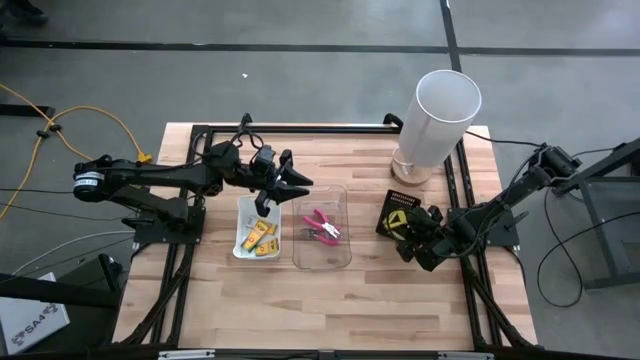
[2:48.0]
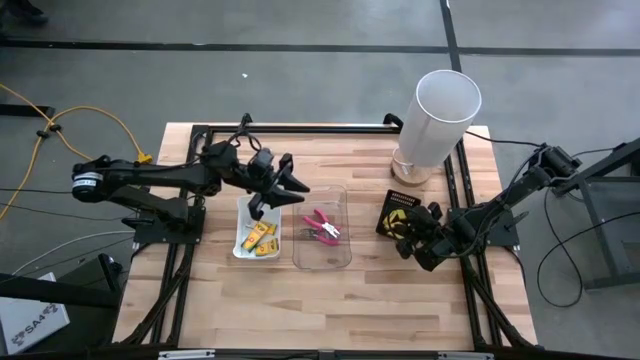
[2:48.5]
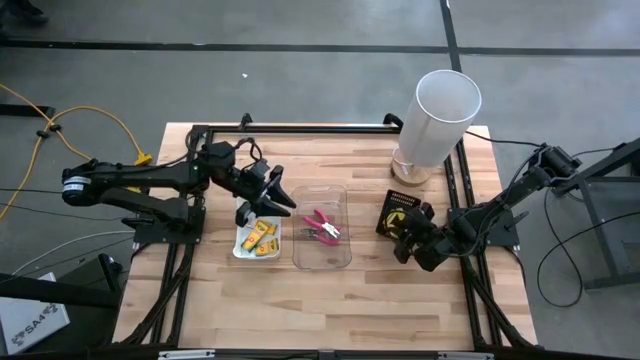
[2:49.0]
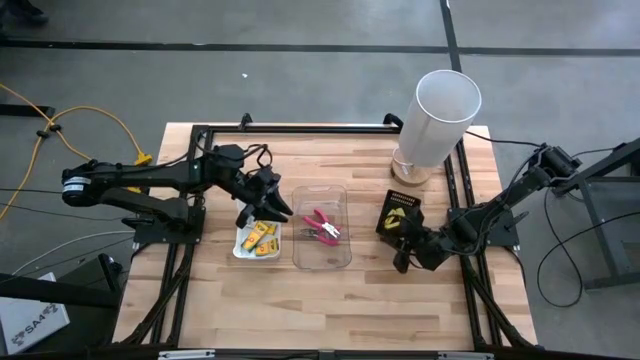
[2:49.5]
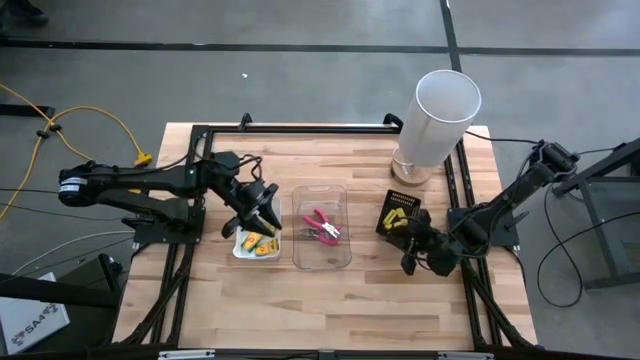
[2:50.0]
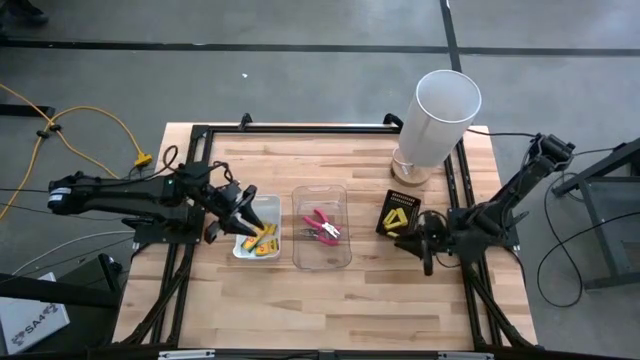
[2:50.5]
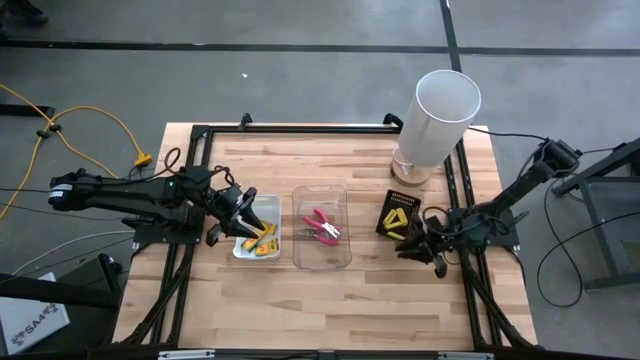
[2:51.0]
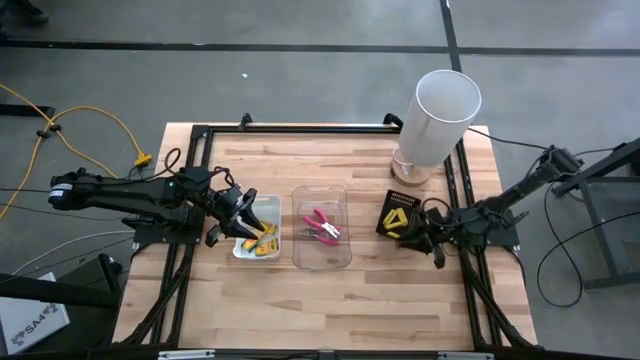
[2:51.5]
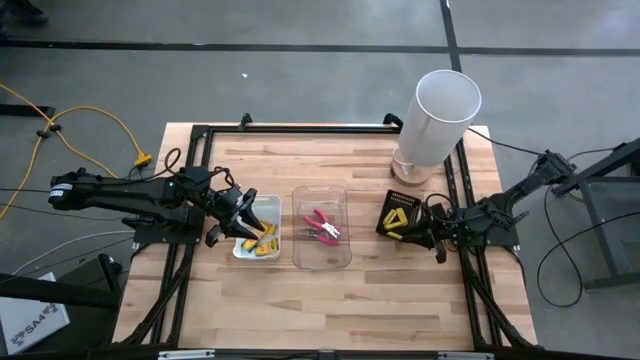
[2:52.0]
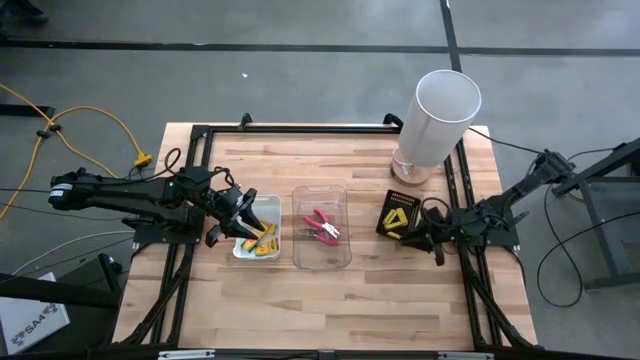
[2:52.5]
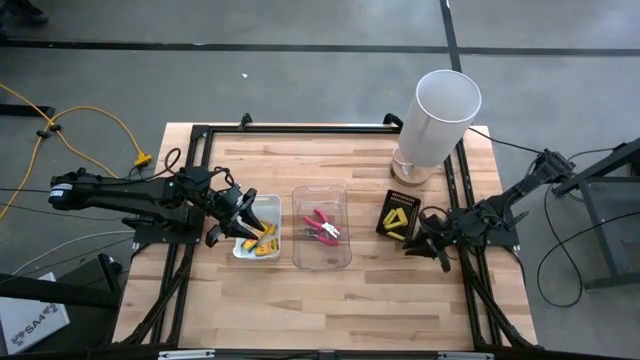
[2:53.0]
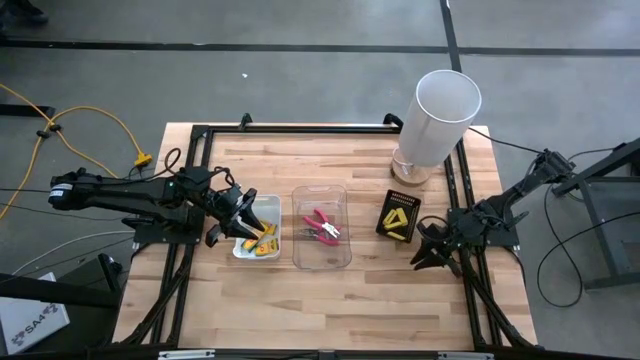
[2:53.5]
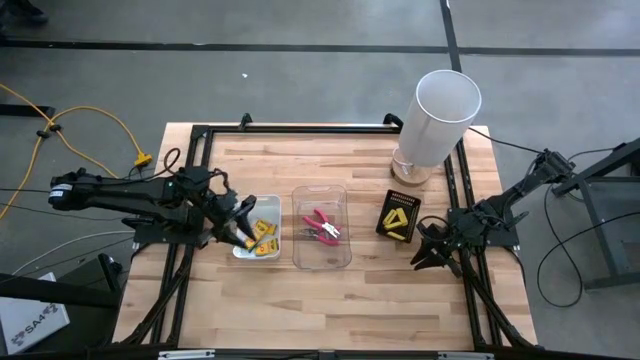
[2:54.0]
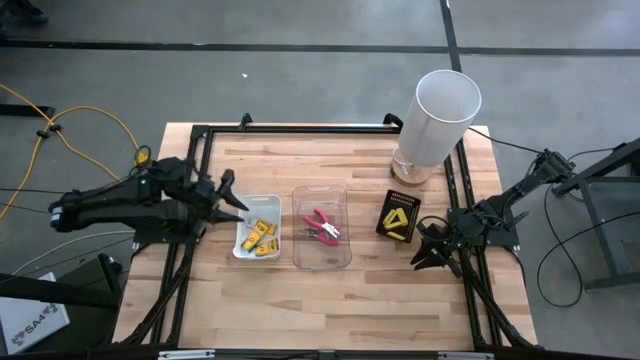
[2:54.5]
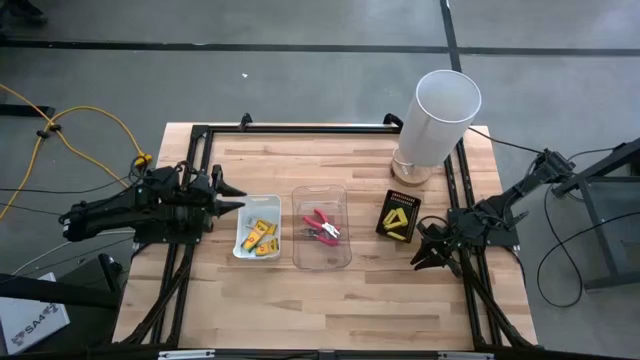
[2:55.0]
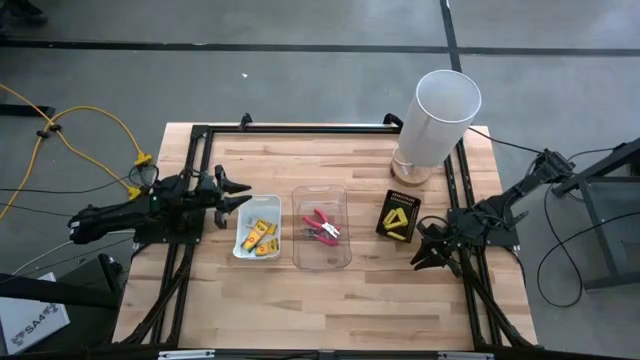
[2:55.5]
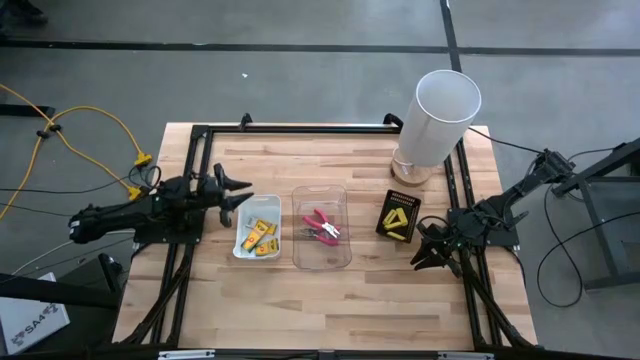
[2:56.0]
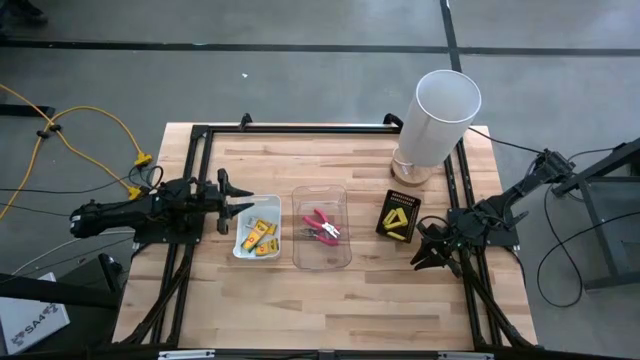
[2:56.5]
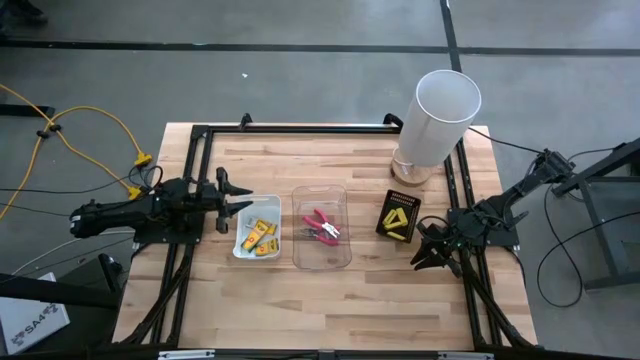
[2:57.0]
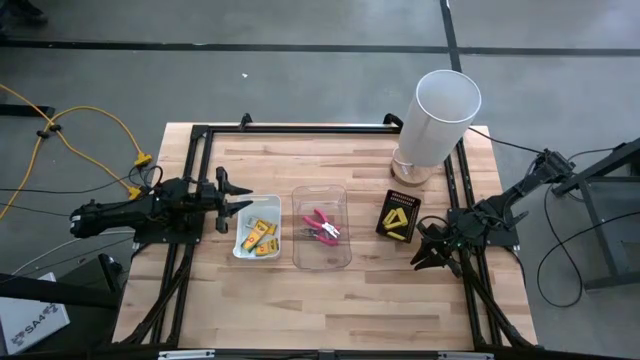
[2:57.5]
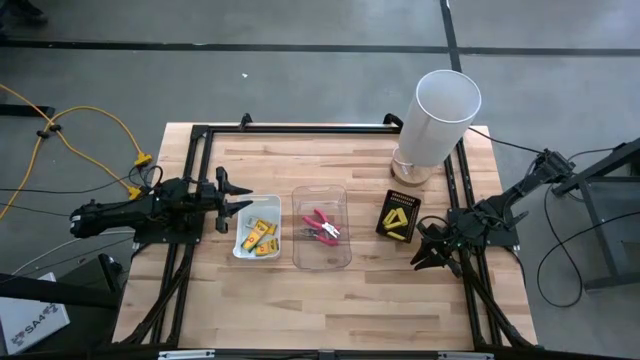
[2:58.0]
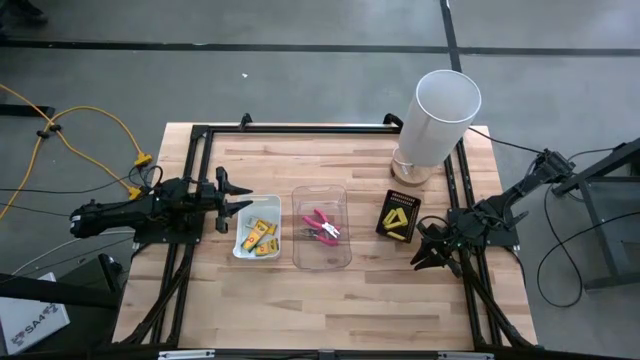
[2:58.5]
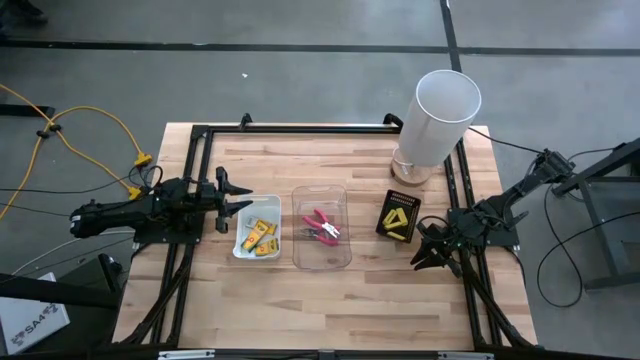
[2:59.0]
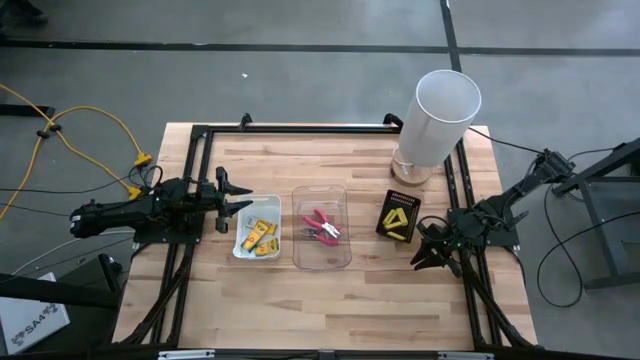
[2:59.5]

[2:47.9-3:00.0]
Task: Pick & Place School Supplies
Return to Home Position

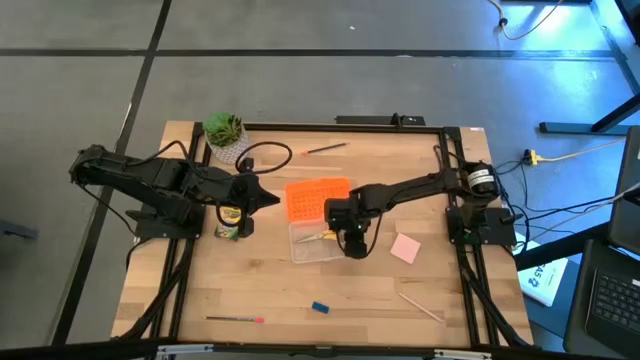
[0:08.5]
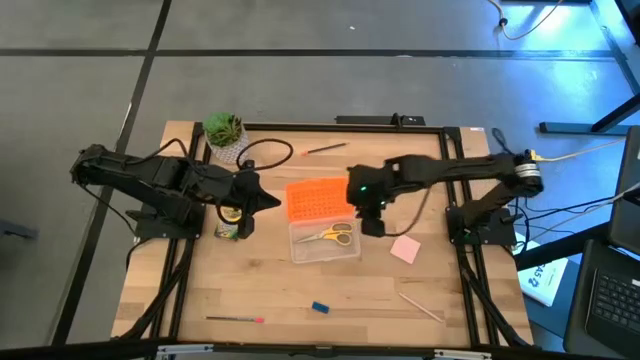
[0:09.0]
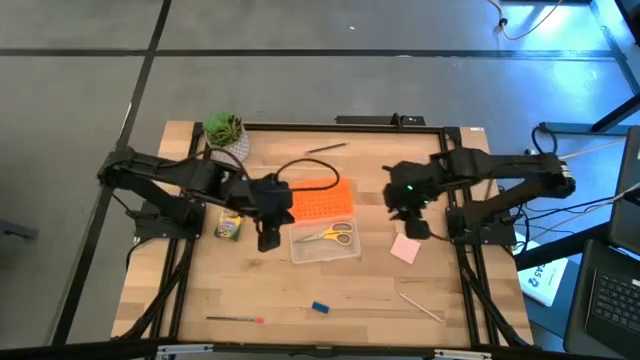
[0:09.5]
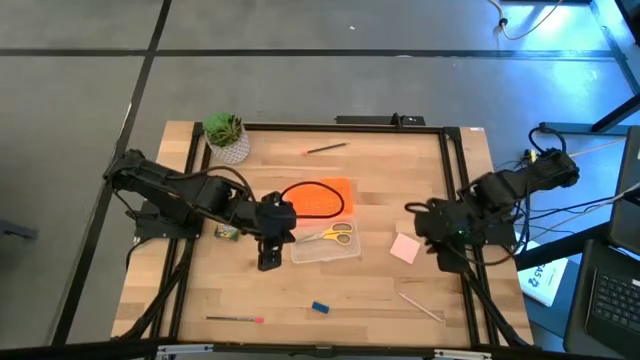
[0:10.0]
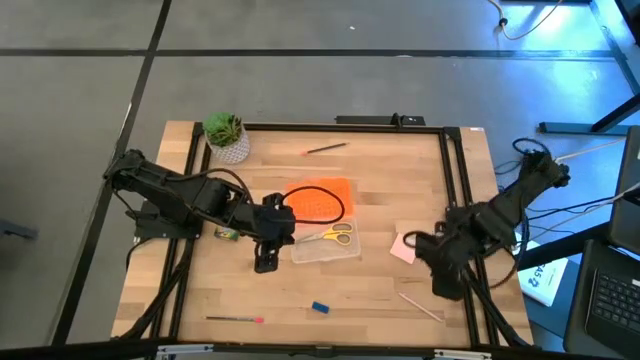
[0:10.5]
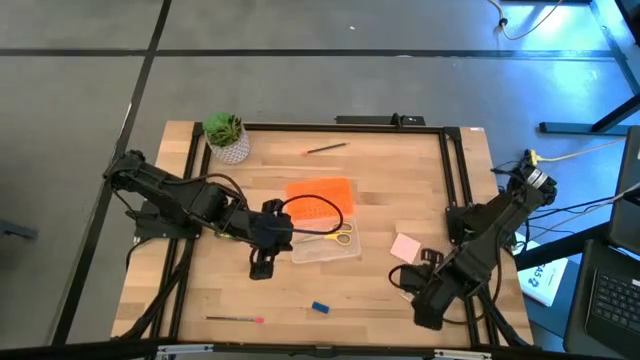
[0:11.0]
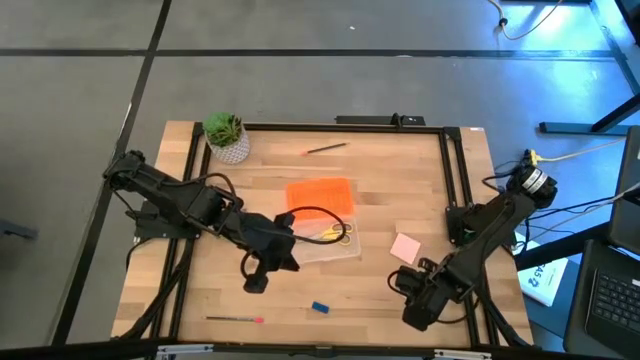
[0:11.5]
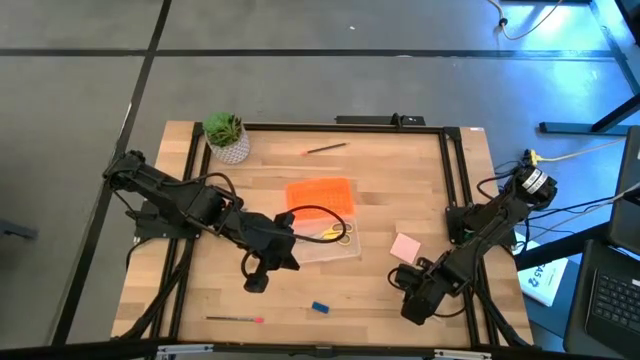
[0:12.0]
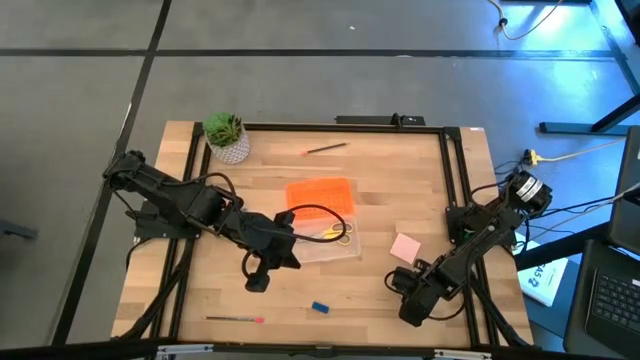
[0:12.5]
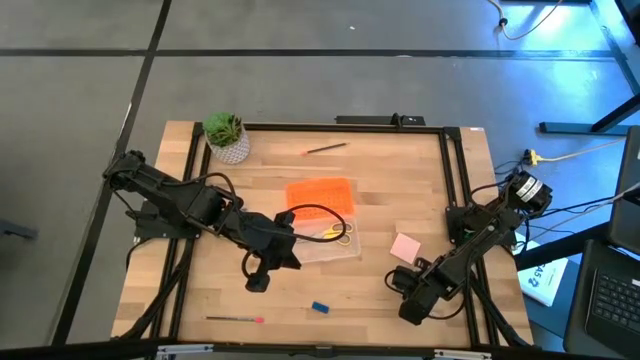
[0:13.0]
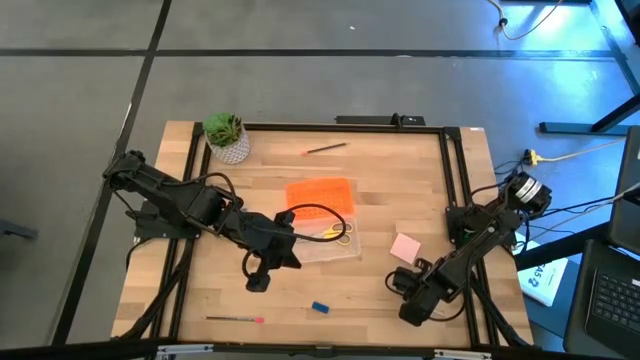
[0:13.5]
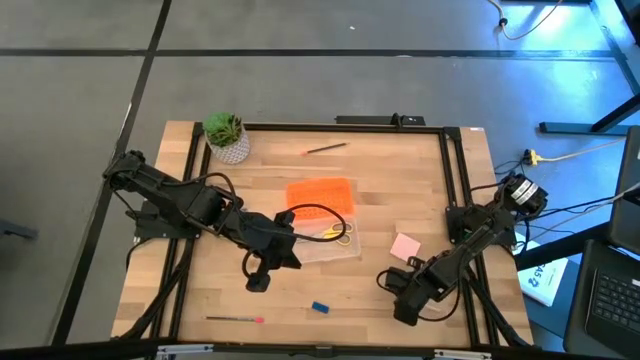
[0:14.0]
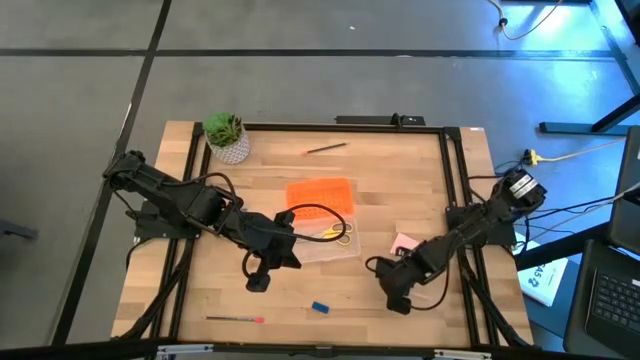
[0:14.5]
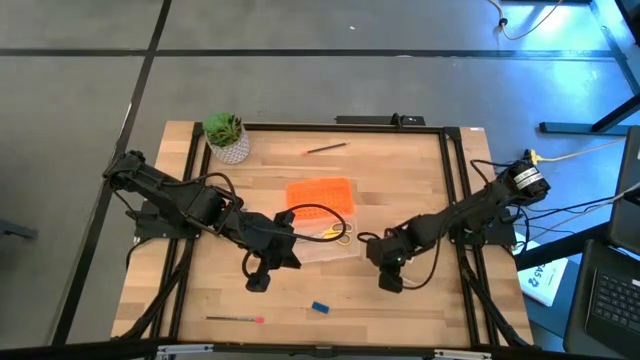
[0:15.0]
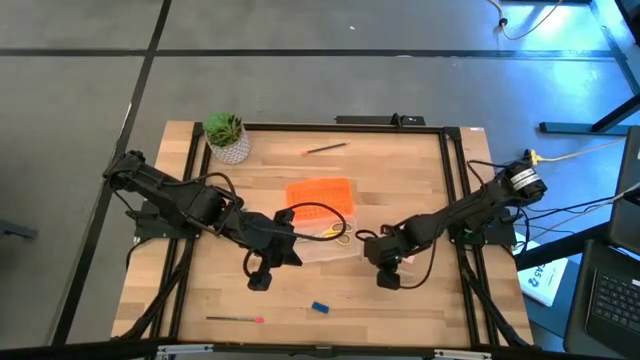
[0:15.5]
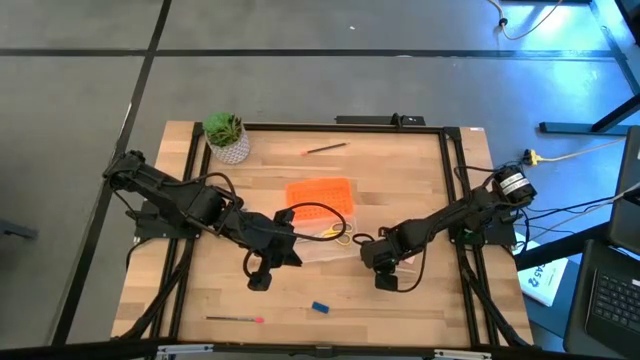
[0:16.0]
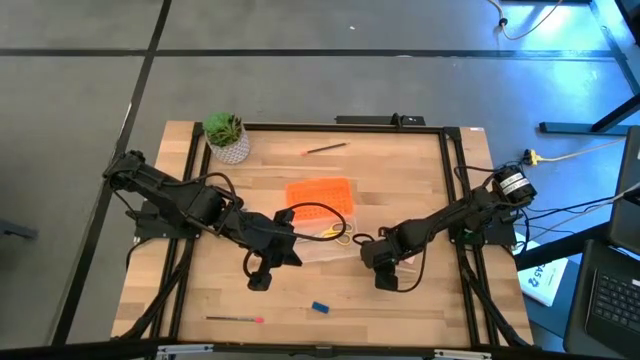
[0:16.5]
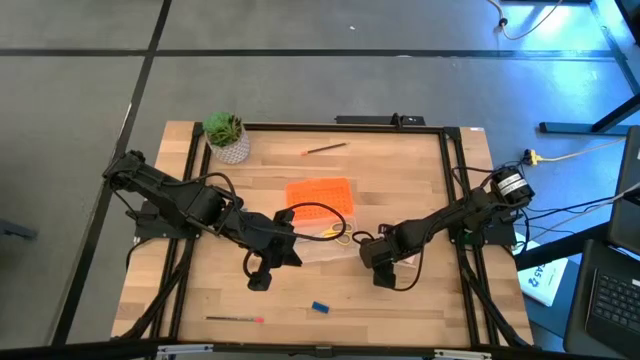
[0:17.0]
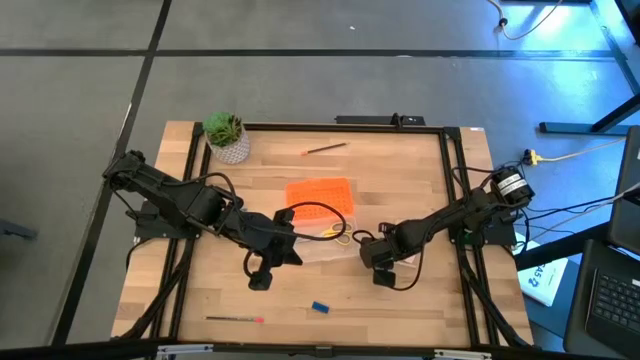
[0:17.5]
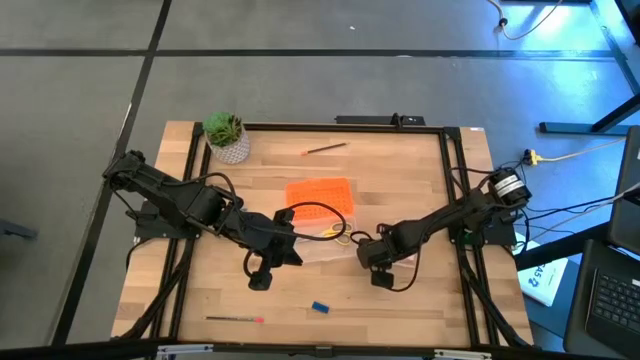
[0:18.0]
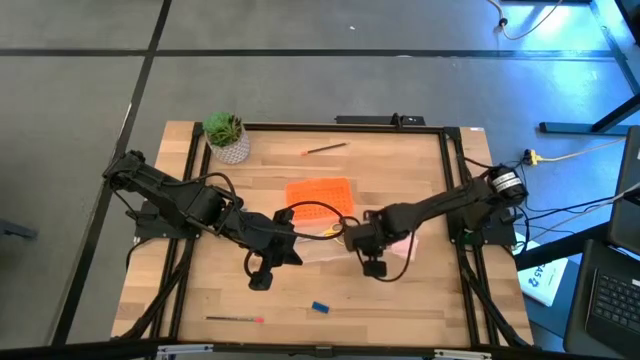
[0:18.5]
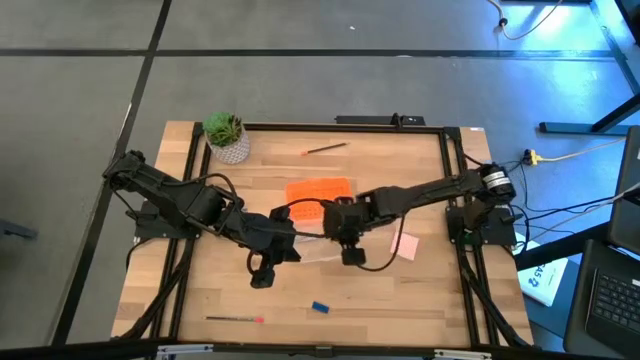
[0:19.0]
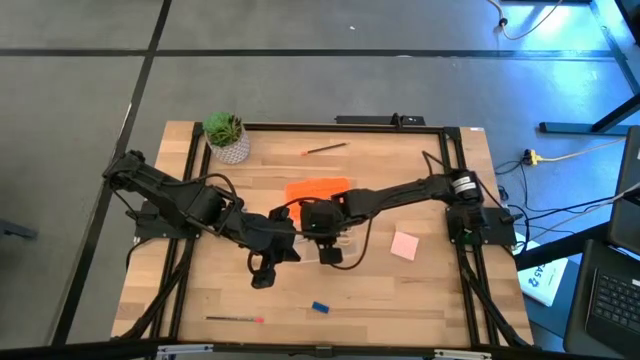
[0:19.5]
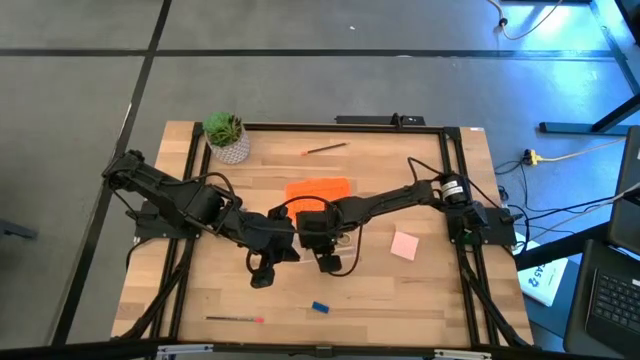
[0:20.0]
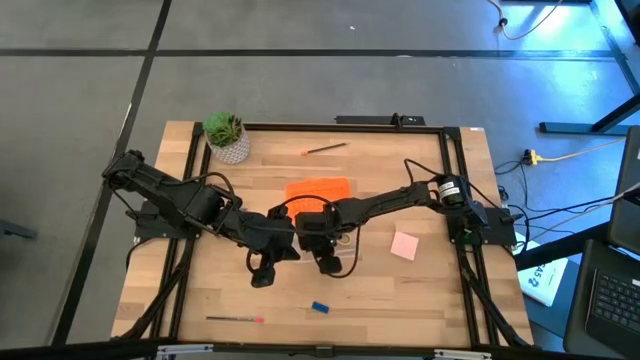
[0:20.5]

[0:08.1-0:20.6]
Task: Pack school essentials
Put the pink pen into the supply box
